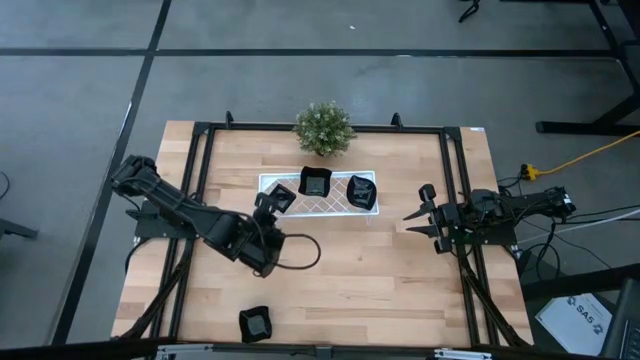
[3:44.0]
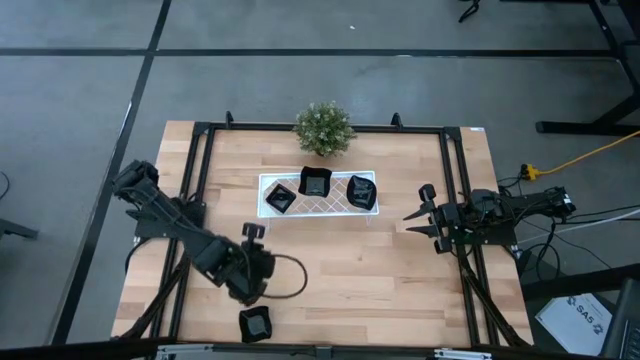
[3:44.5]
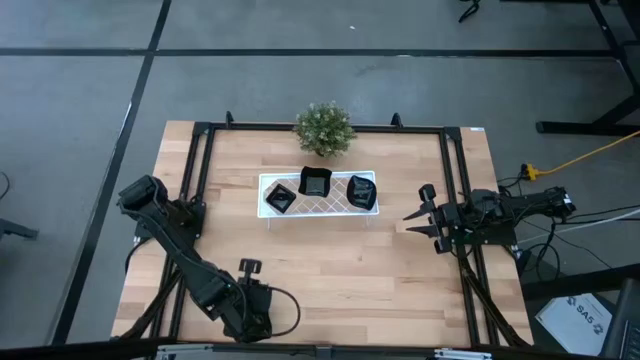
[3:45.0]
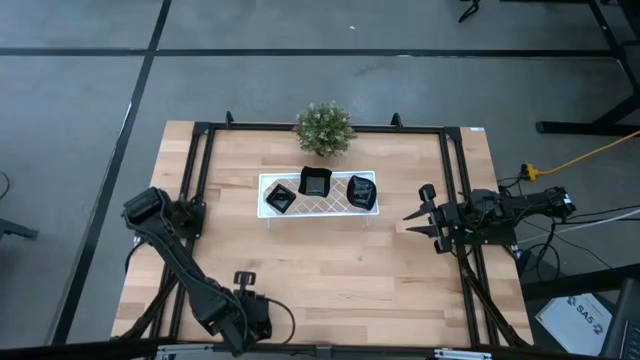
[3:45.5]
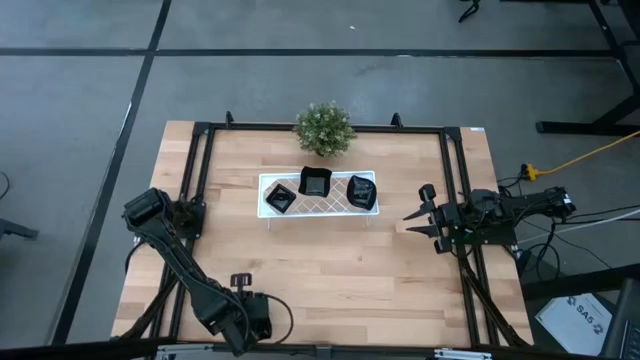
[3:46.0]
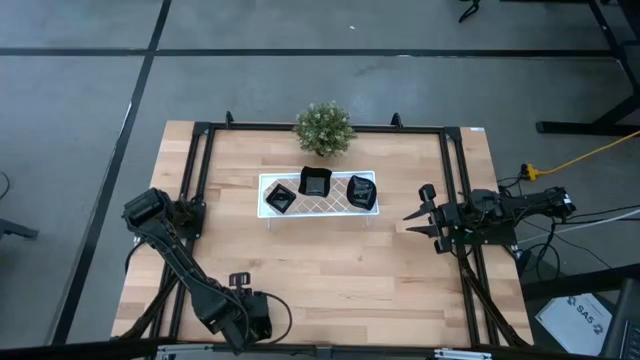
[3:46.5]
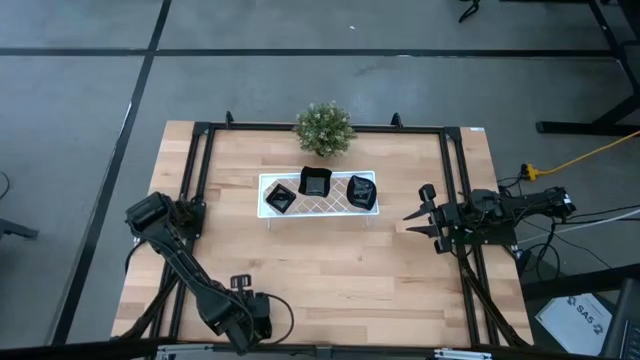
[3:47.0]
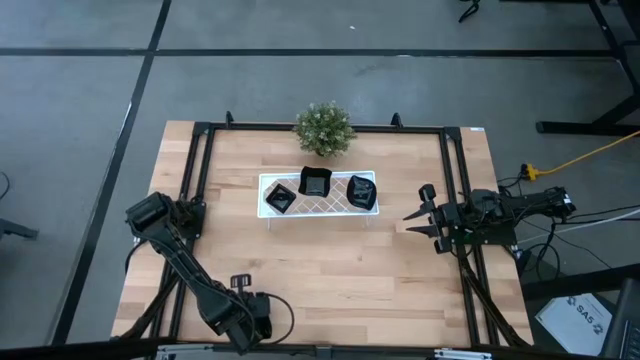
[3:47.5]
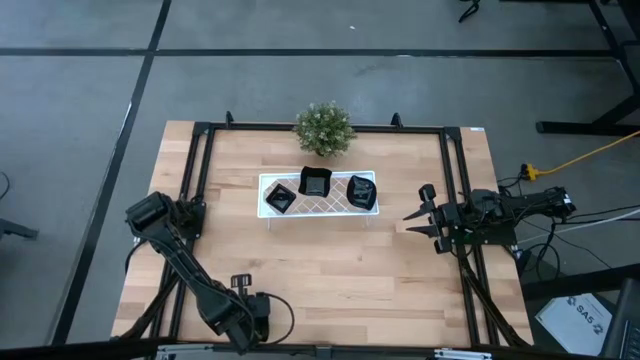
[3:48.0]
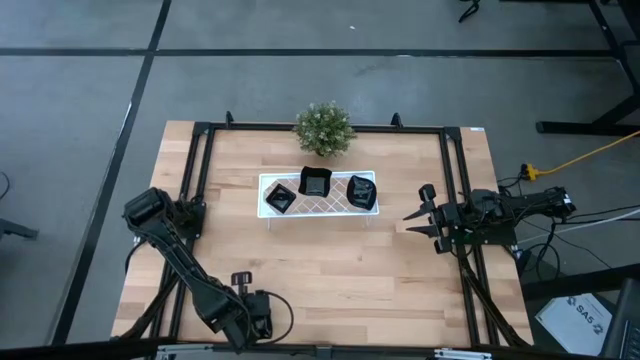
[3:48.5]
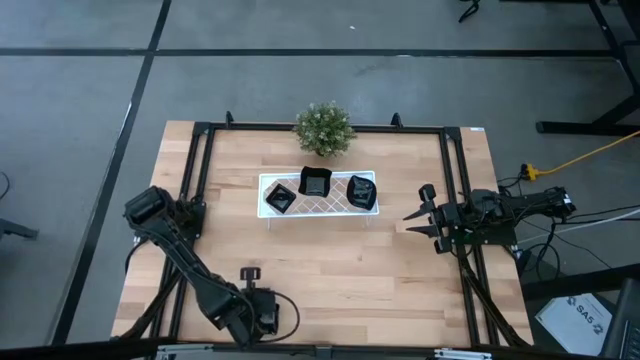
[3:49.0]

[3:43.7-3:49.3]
Task: Pick & Place Mini shaped plates
Stack the black leaf-shaped plate on top of the black leaf-shaped plate on the shelf

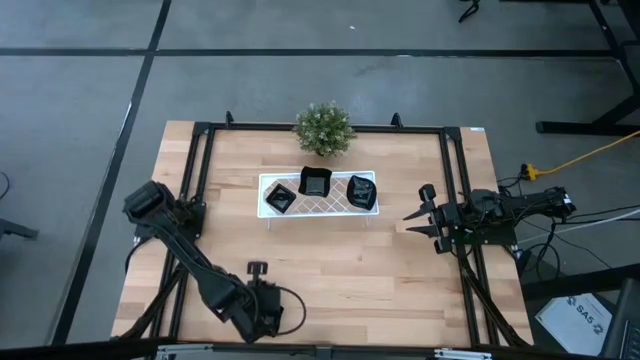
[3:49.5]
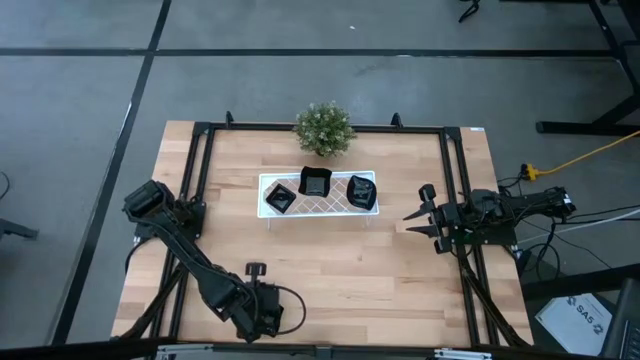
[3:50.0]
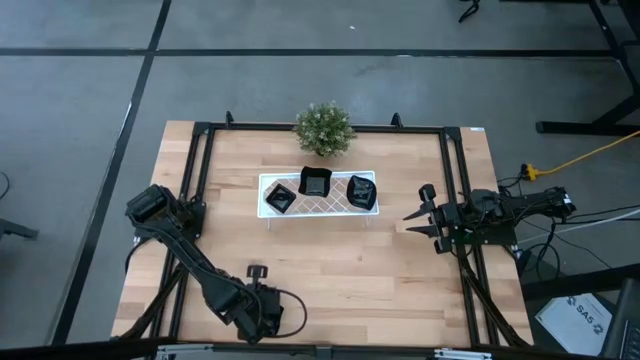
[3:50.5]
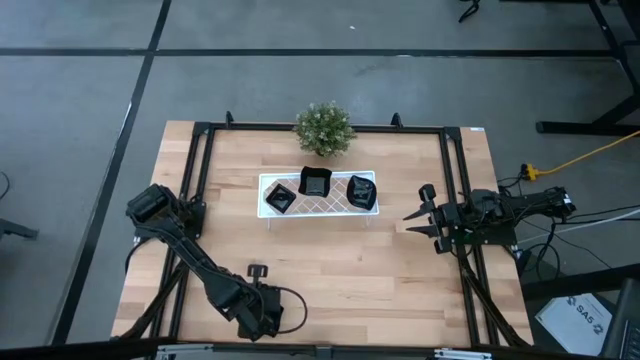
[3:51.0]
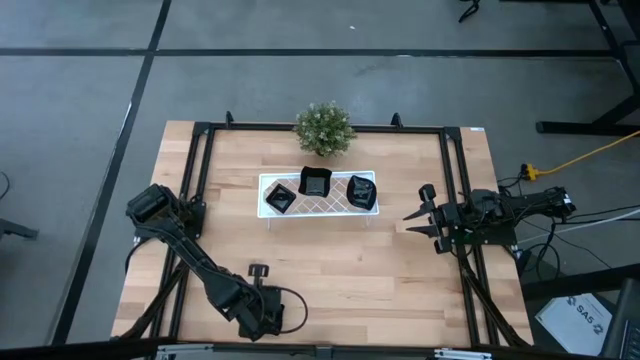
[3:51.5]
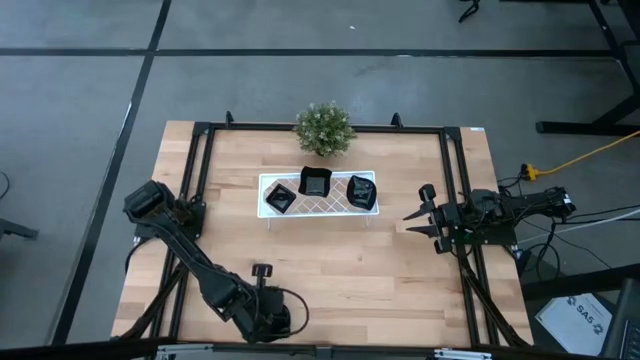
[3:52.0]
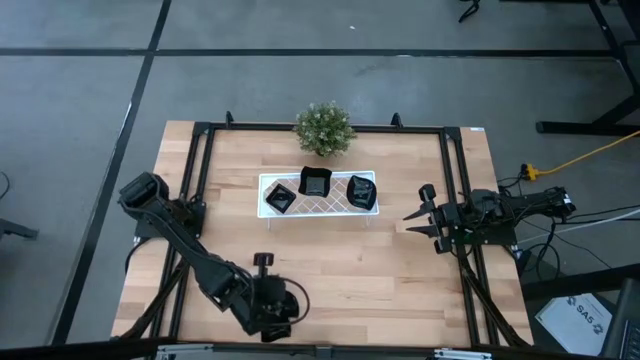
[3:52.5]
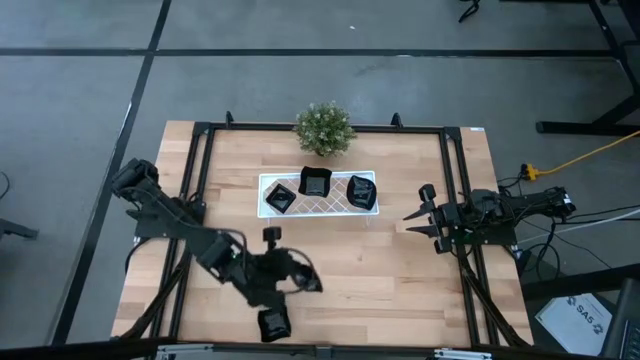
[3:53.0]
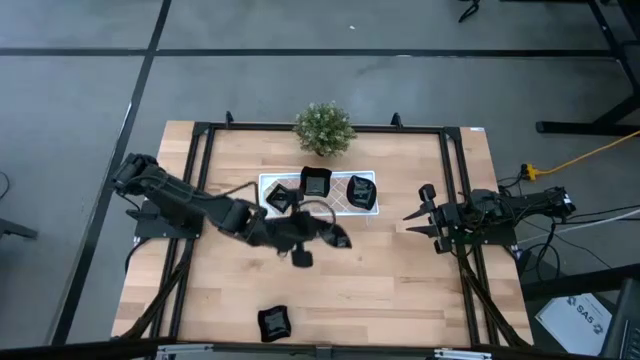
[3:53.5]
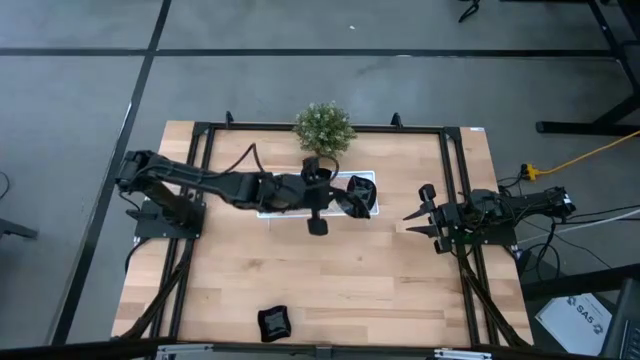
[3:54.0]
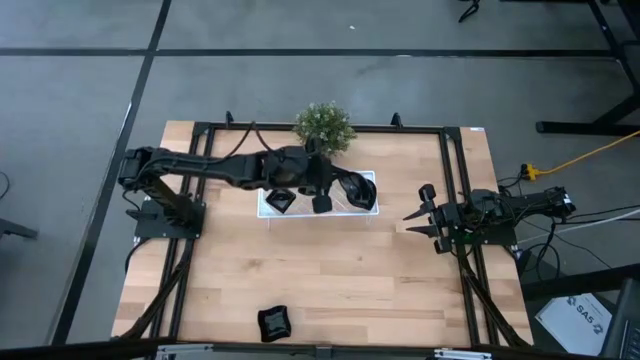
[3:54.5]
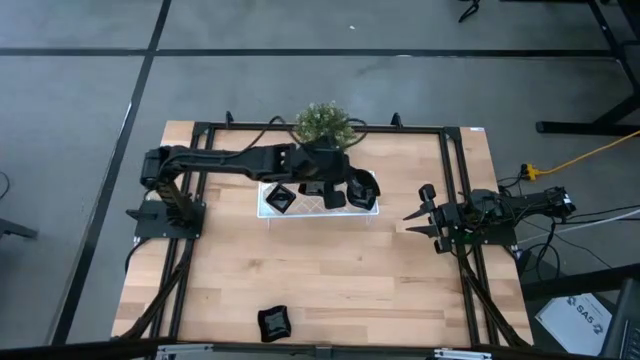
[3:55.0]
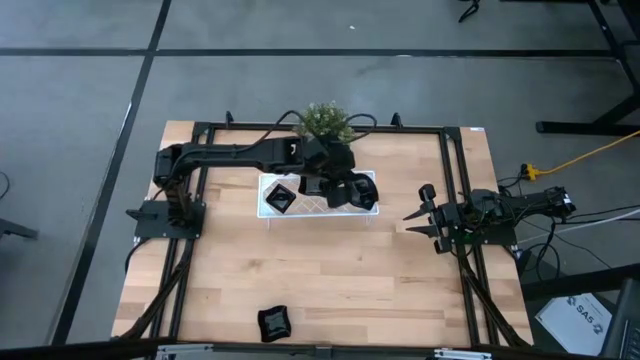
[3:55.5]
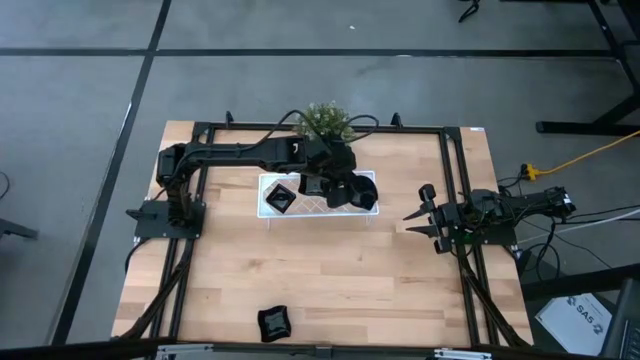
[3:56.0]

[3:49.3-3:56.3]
Stack the black leaf-shaped plate on top of the black leaf-shaped plate on the shelf

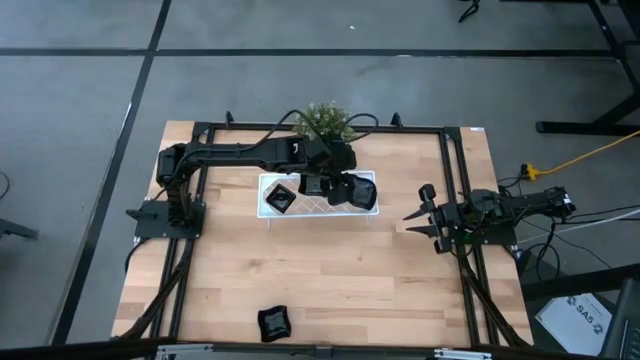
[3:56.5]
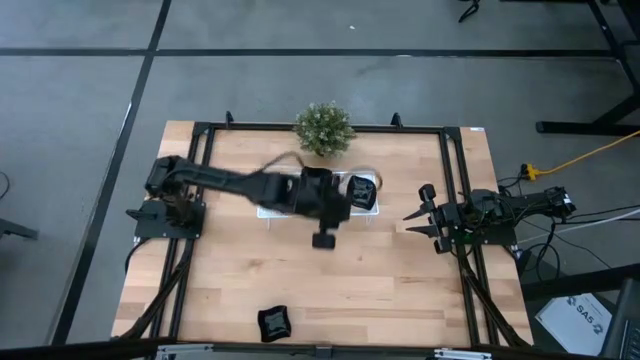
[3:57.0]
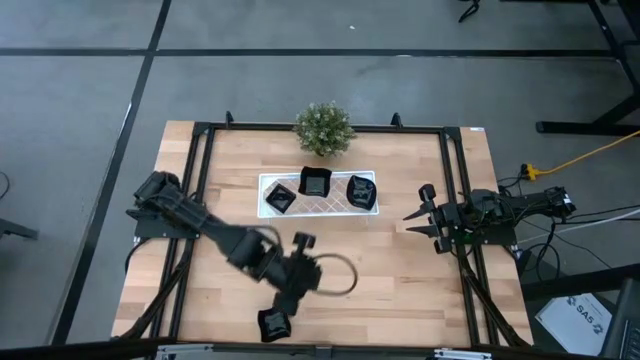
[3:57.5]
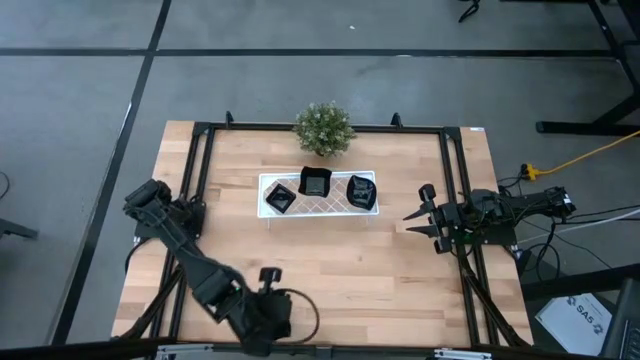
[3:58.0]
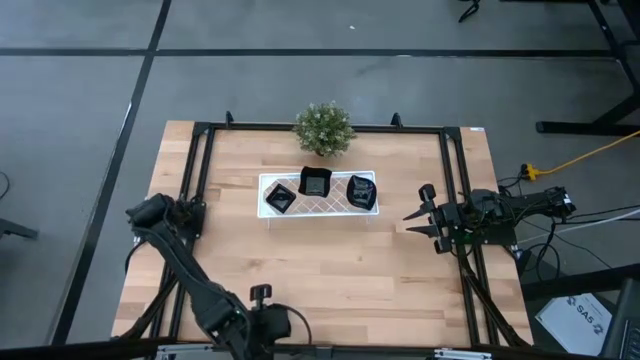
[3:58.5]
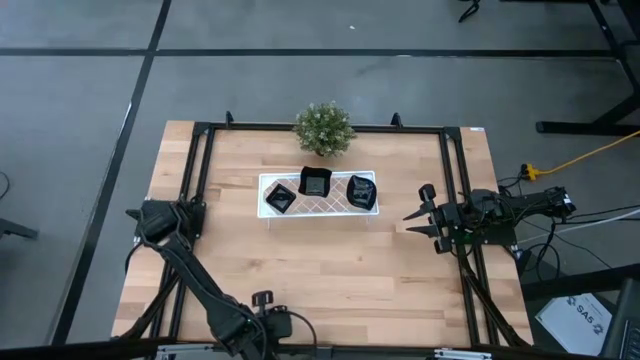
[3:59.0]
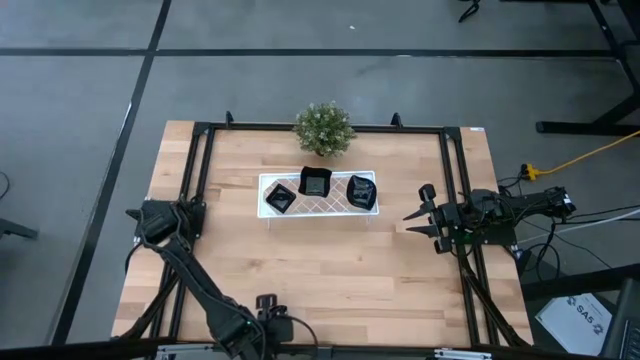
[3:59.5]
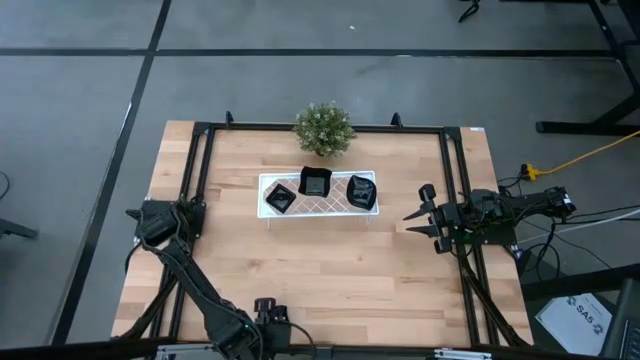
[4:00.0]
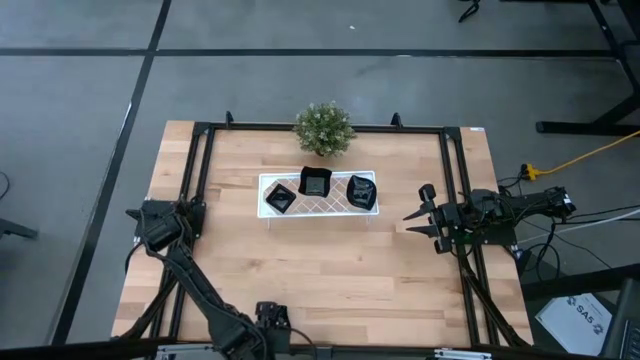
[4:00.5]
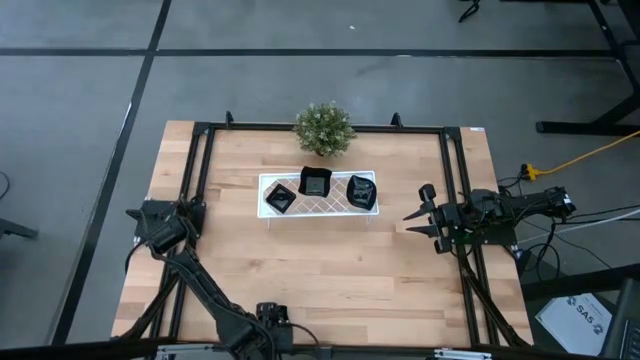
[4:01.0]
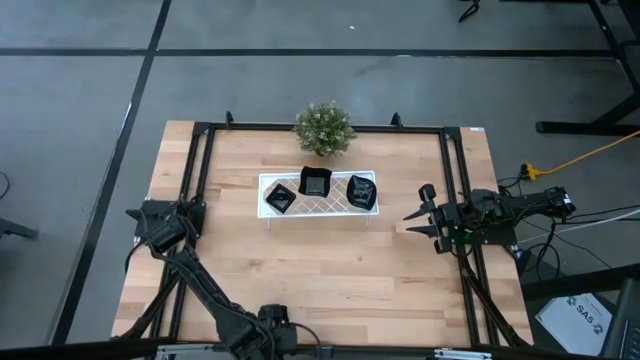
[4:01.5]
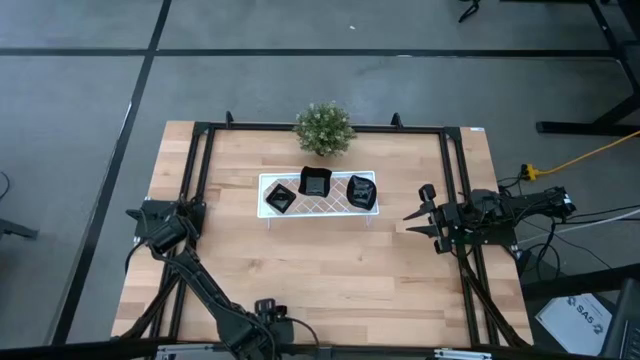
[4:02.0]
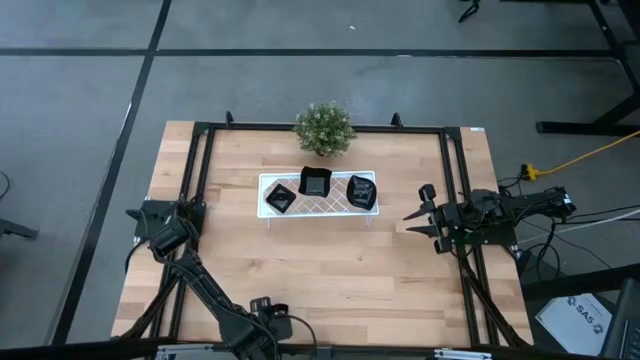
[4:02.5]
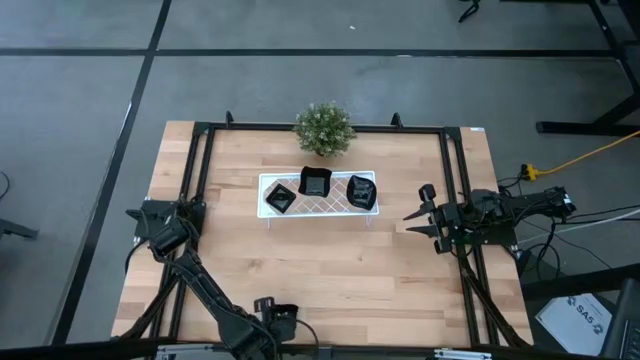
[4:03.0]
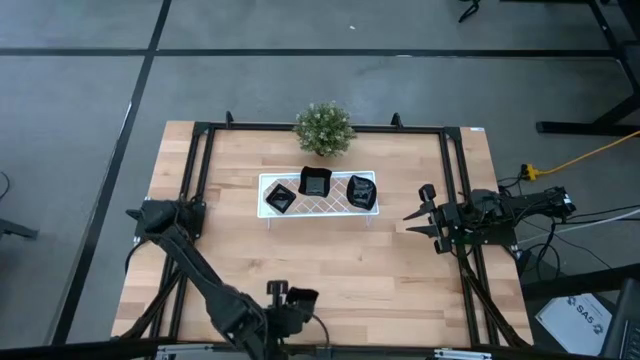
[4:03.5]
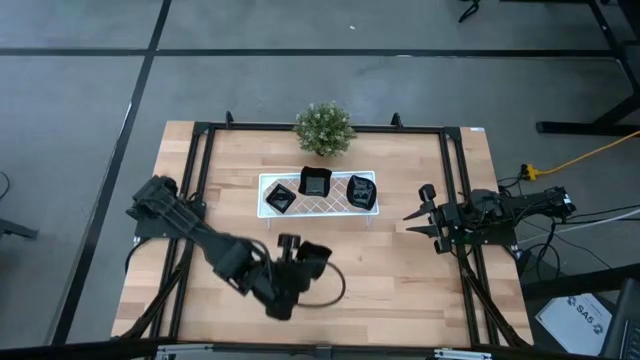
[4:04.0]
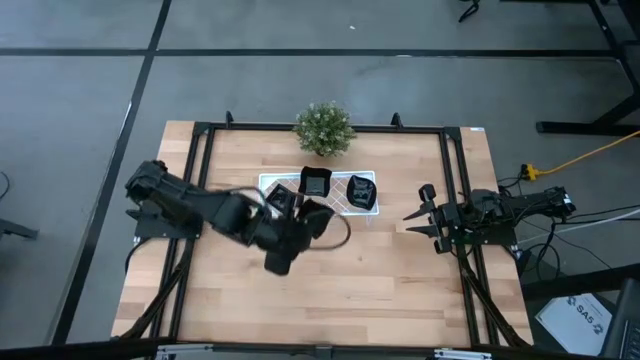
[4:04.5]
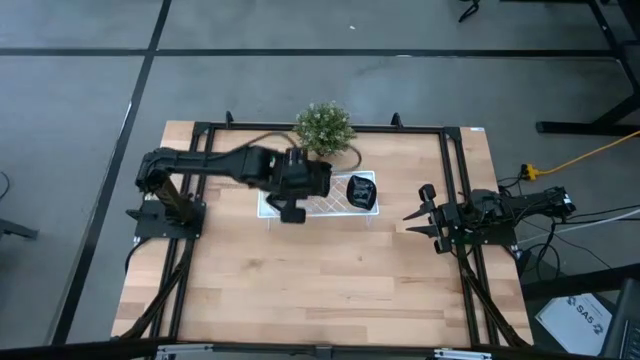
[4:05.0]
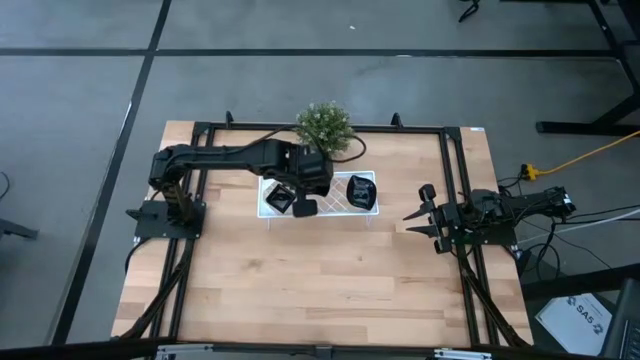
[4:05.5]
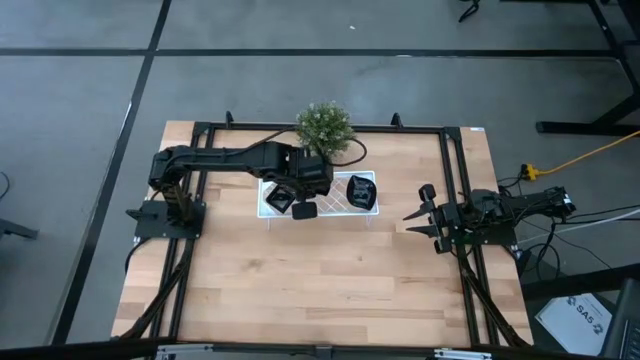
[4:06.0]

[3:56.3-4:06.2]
Stack the black distorted square plate on top of the black distorted square plate on the shelf
